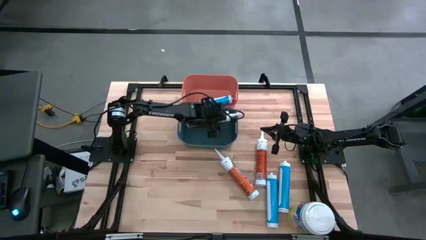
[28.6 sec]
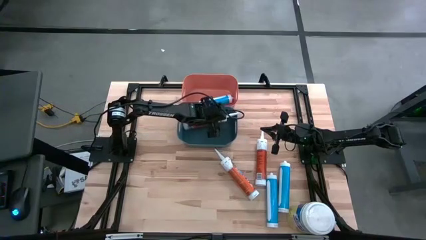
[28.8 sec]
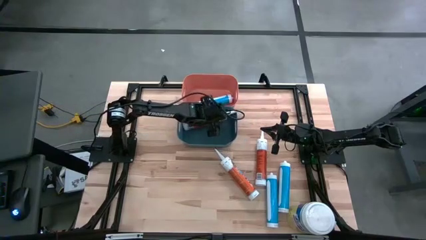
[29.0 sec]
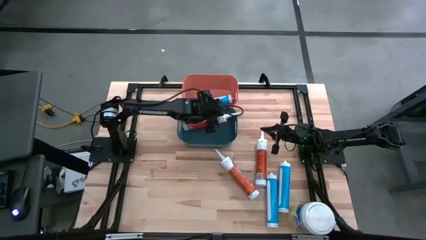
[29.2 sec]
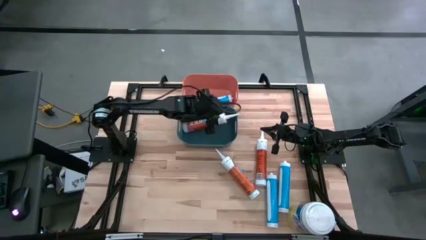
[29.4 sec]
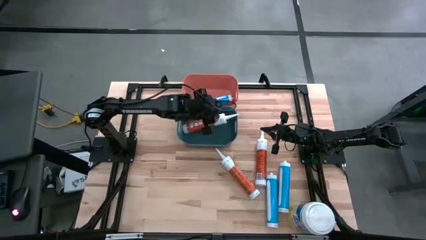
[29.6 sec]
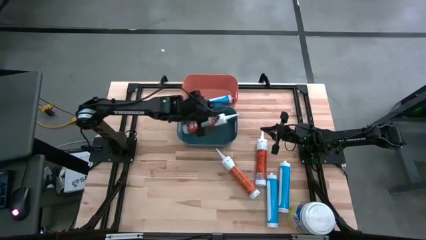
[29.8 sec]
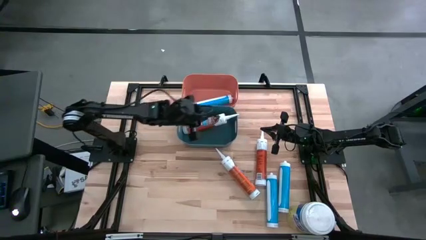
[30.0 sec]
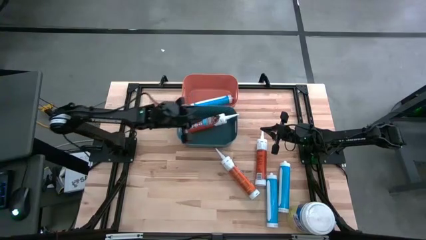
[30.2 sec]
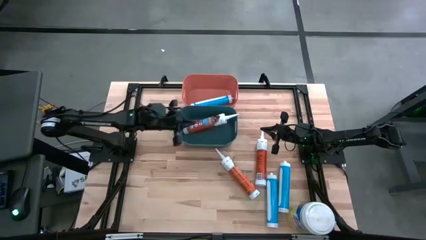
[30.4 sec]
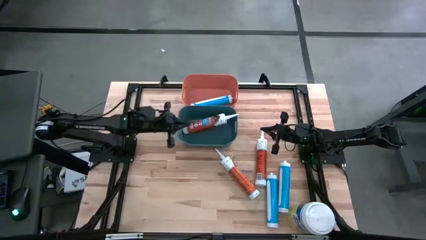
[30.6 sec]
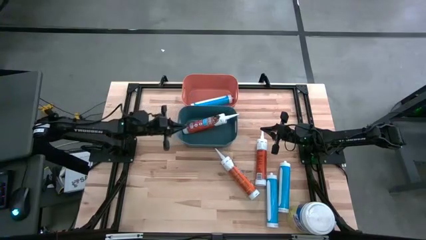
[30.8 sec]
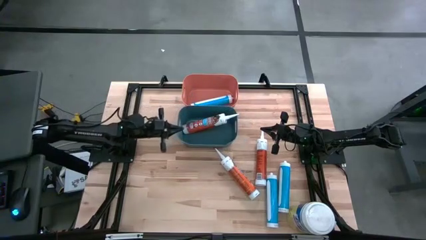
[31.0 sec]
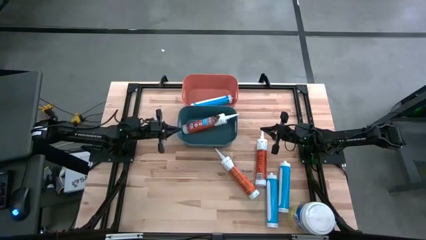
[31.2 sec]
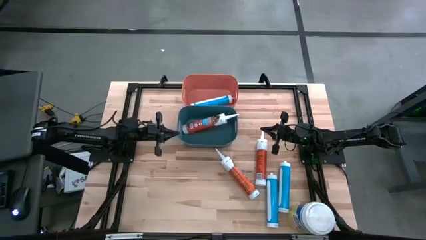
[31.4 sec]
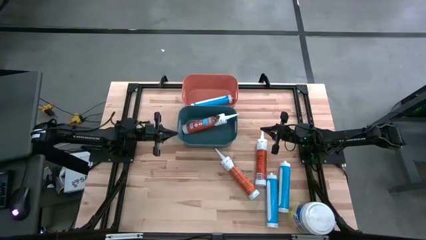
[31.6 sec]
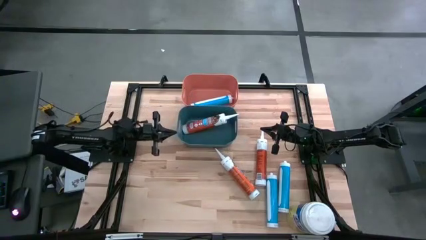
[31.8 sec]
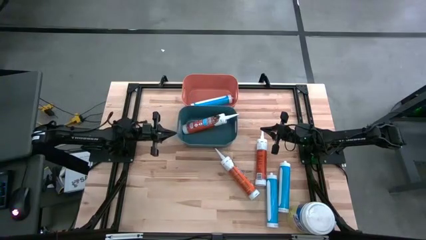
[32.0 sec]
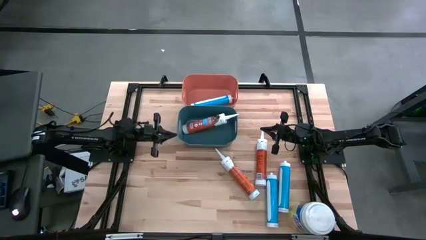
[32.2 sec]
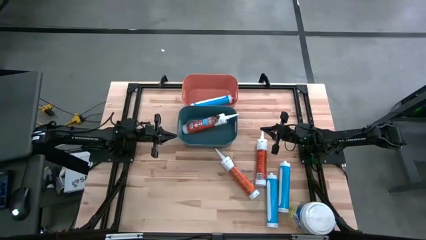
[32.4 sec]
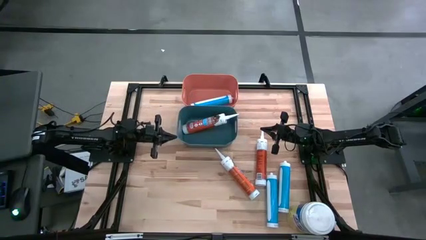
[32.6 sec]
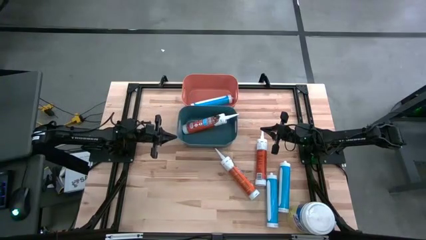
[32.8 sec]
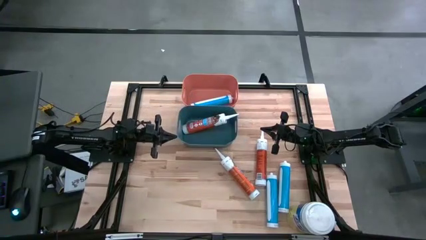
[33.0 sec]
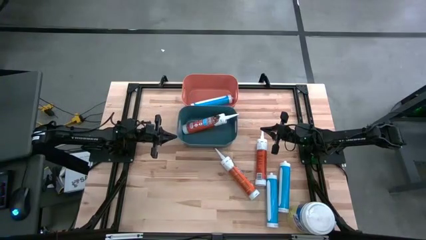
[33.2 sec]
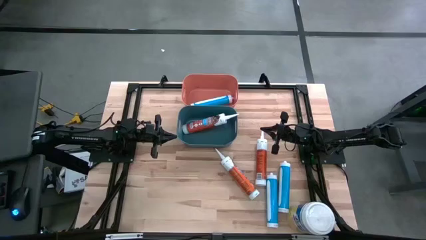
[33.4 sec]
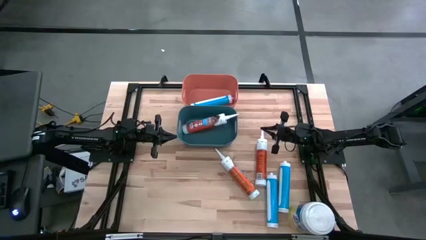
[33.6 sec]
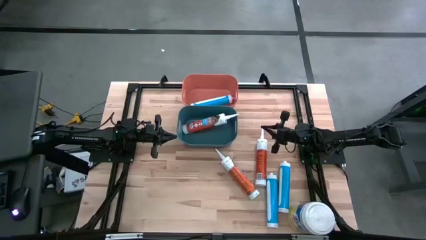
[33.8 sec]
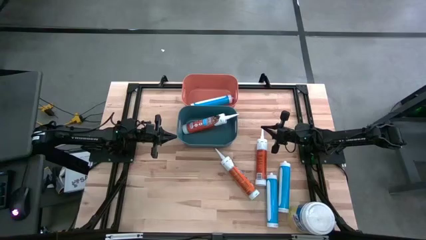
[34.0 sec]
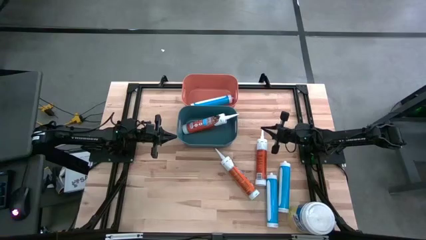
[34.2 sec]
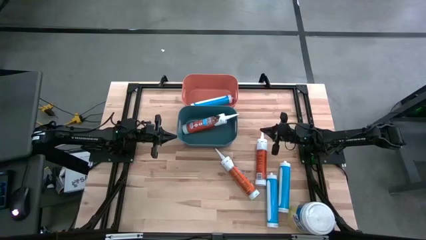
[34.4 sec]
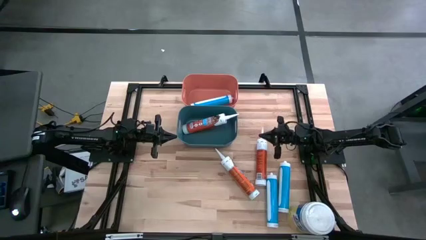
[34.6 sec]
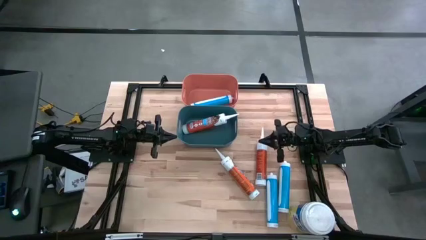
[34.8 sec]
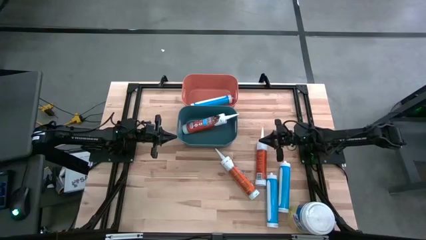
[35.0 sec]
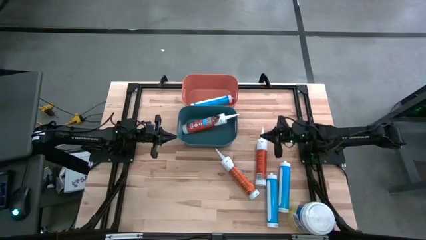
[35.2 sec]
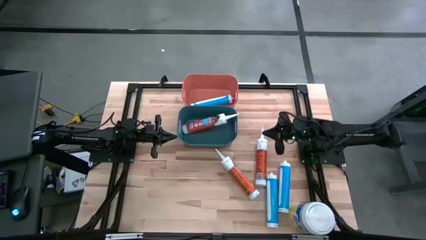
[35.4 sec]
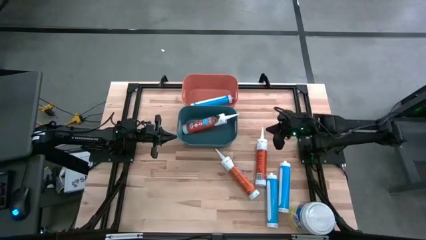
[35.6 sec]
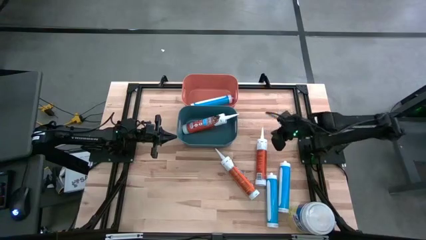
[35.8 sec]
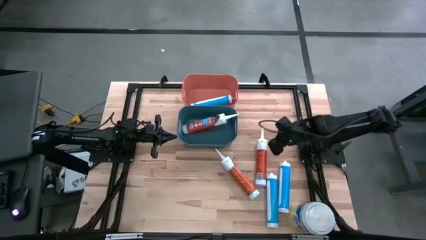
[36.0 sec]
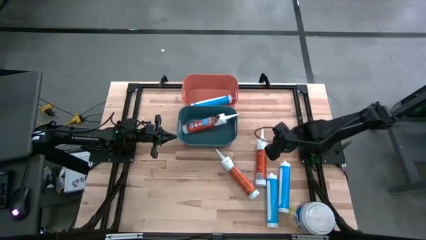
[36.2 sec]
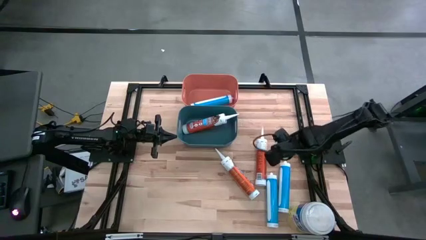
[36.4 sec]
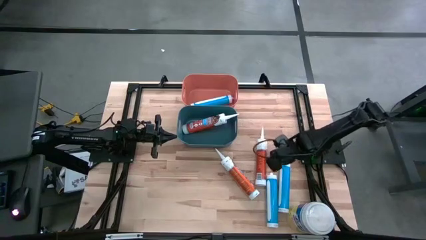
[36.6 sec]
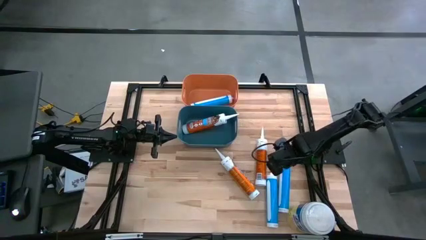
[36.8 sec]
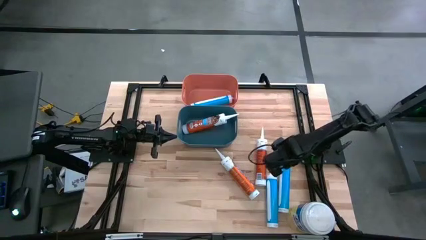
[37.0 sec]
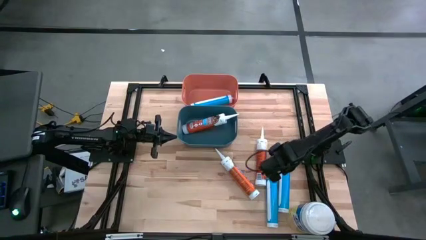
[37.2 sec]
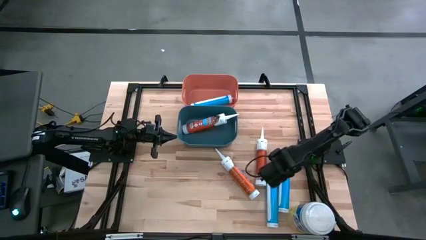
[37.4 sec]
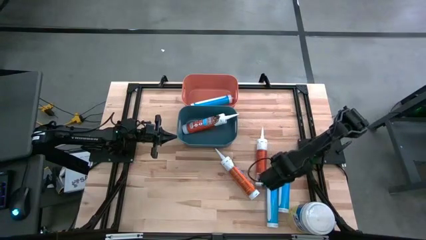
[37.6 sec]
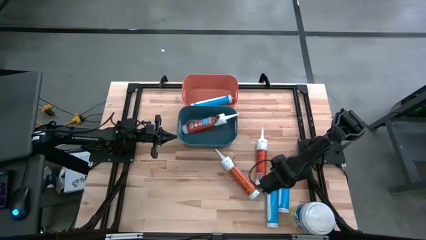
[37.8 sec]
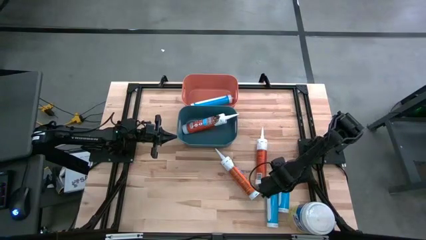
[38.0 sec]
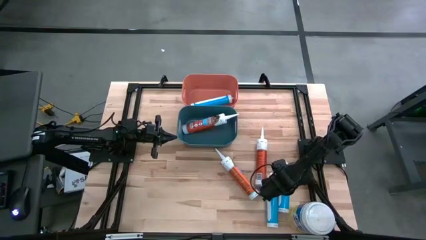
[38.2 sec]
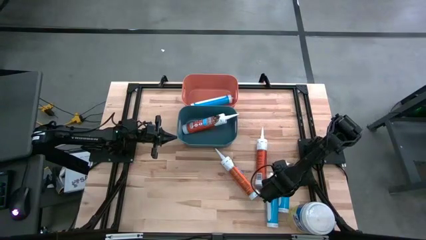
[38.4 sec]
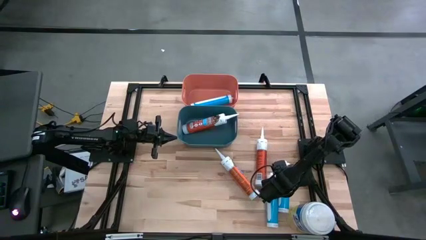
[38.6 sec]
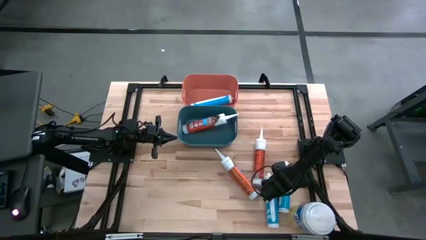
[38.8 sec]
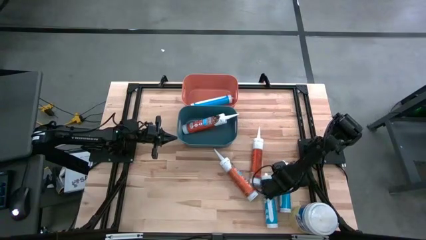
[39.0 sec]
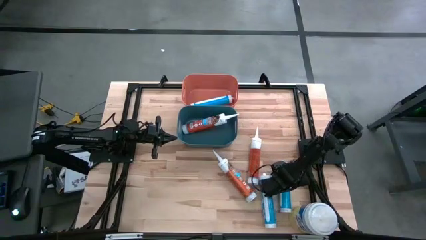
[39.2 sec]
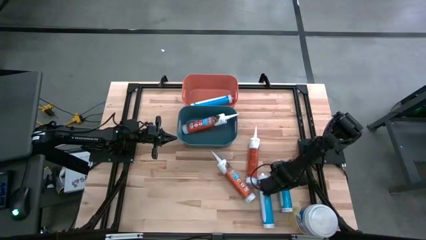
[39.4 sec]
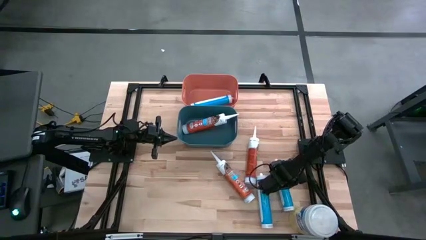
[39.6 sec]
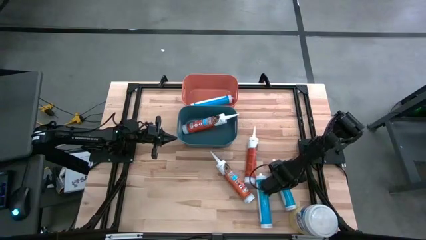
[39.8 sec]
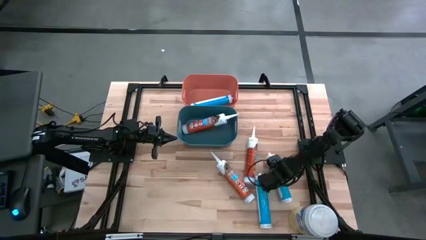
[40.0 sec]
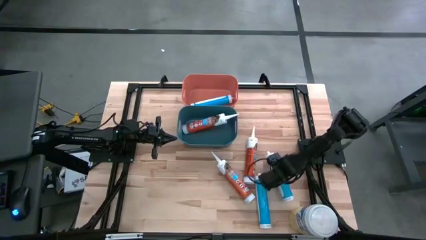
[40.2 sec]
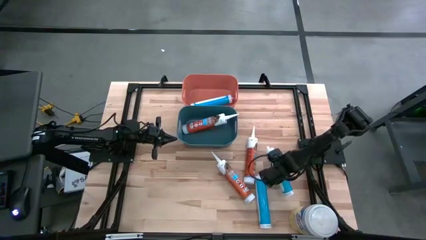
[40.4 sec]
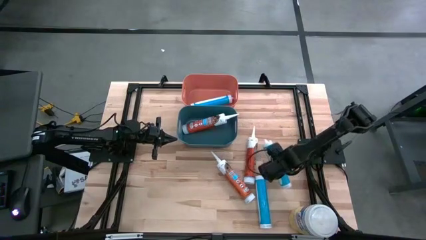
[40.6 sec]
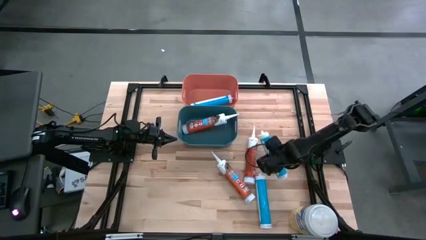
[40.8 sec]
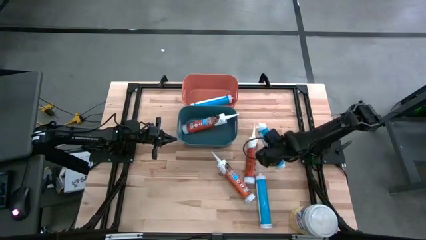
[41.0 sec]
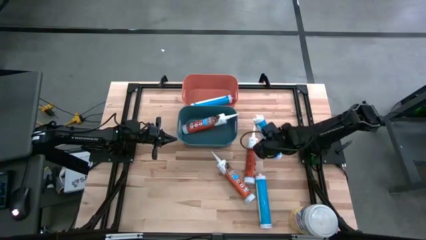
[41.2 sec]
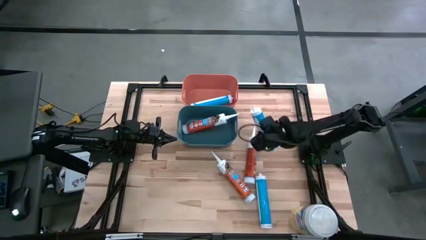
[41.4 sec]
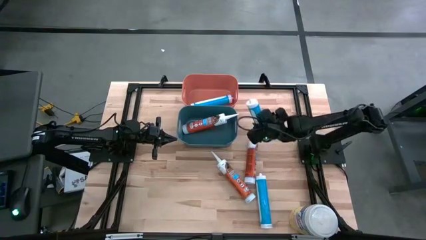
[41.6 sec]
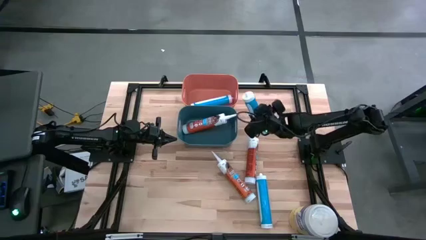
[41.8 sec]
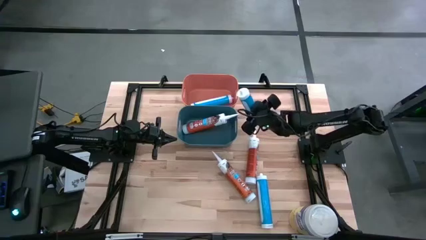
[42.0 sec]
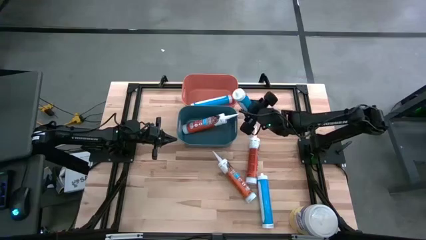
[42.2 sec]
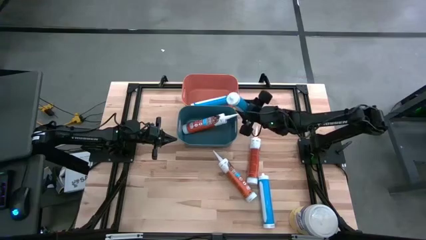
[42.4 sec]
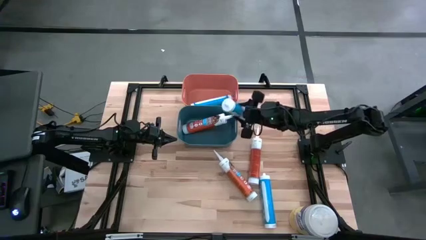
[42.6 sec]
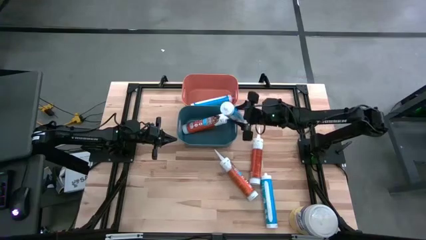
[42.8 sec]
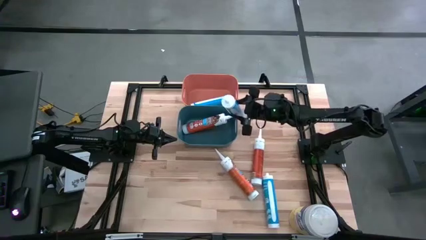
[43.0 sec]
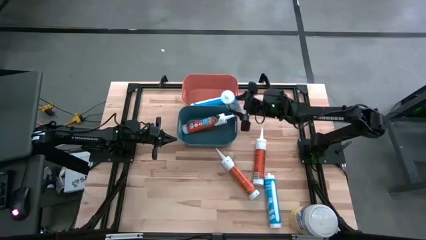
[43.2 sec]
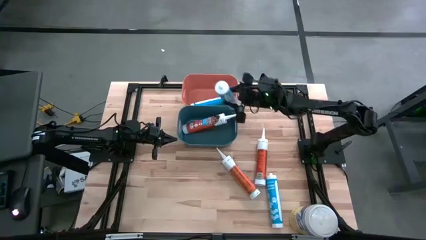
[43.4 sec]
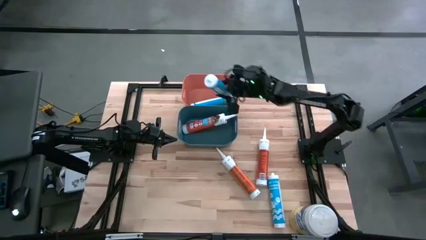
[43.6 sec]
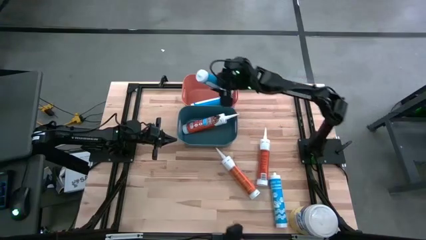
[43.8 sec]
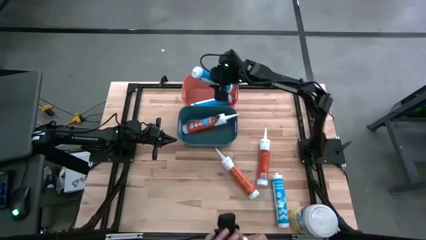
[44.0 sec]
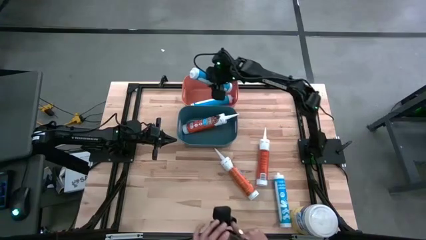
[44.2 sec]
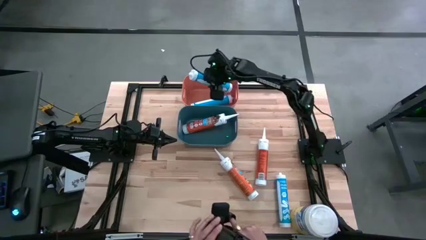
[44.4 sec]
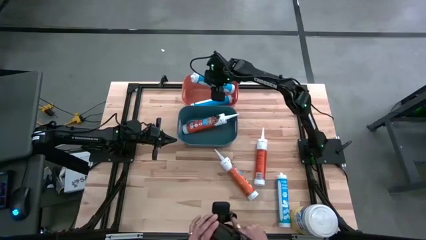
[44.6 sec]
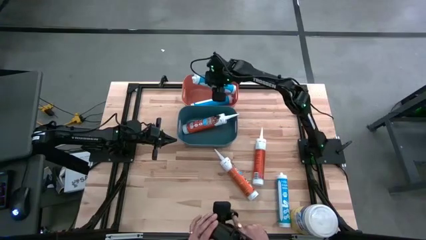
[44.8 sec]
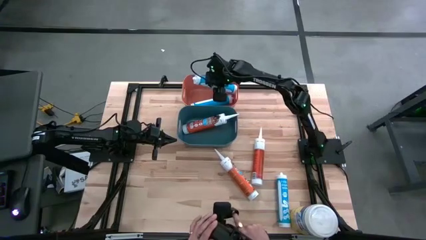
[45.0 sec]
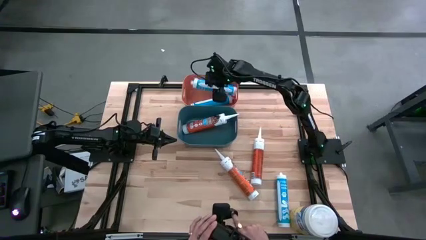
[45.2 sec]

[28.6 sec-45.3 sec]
Task: Pick & place silicon tubes, Sealant and Lysol wipes
Put the right blue sealant into the orange bin
